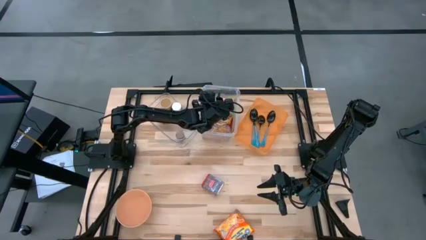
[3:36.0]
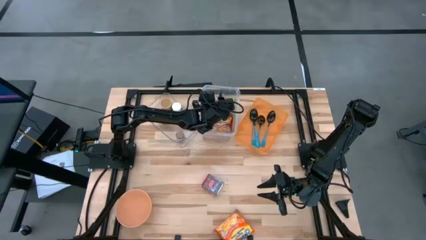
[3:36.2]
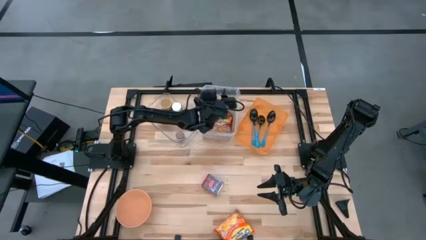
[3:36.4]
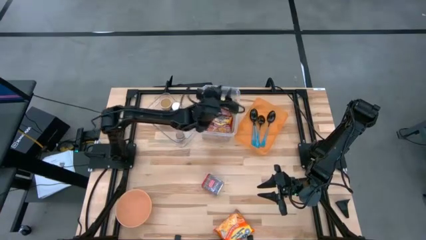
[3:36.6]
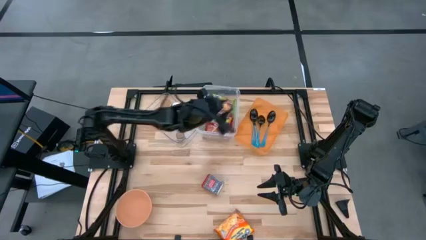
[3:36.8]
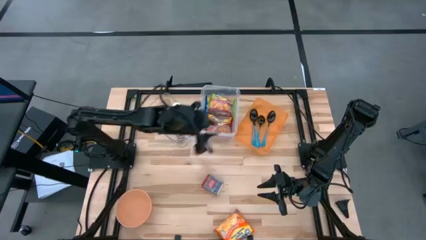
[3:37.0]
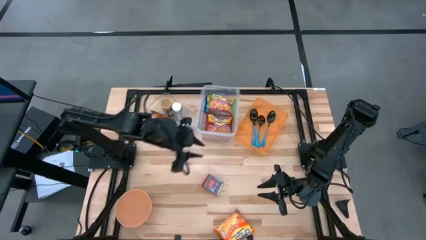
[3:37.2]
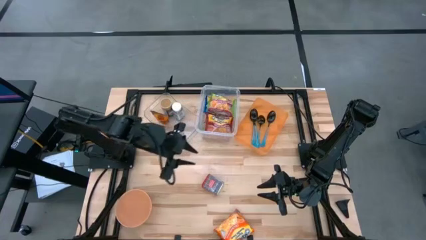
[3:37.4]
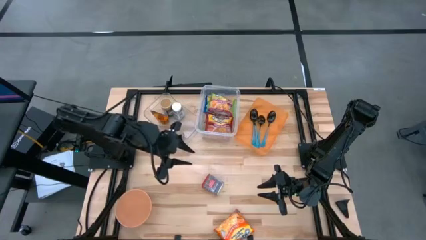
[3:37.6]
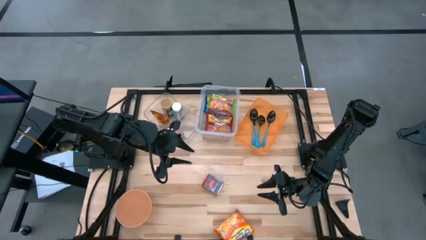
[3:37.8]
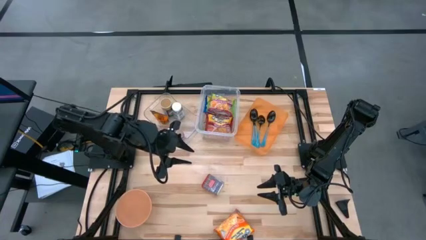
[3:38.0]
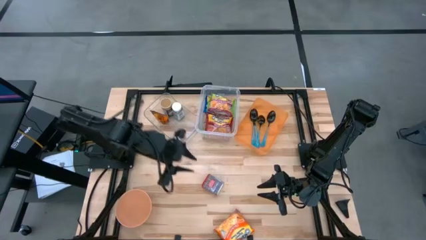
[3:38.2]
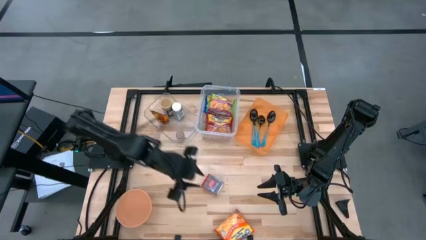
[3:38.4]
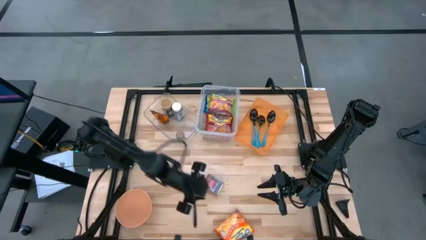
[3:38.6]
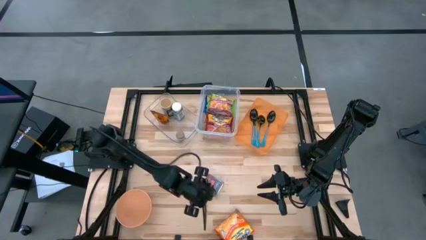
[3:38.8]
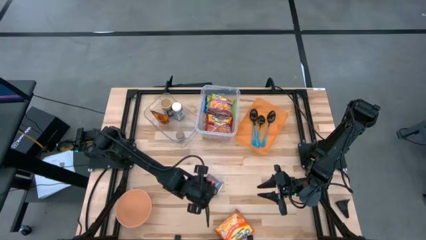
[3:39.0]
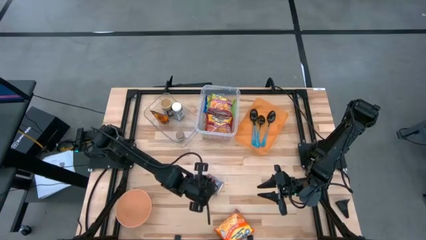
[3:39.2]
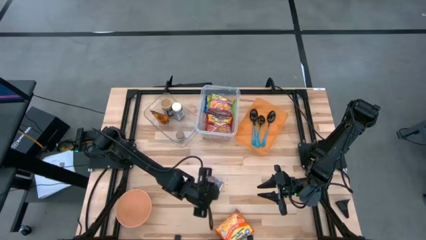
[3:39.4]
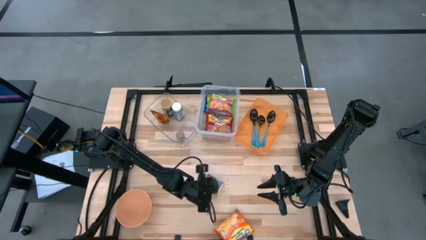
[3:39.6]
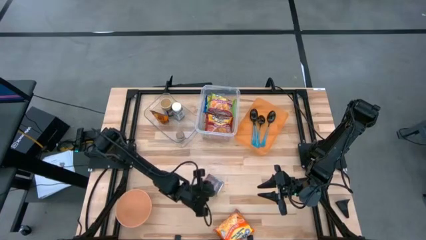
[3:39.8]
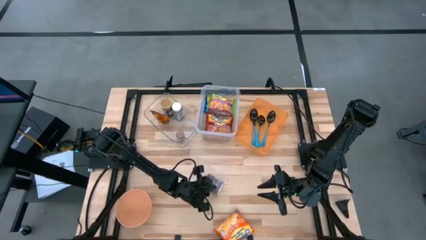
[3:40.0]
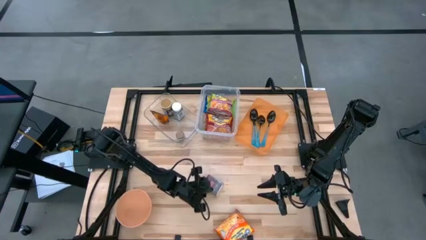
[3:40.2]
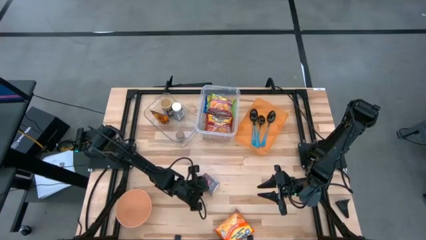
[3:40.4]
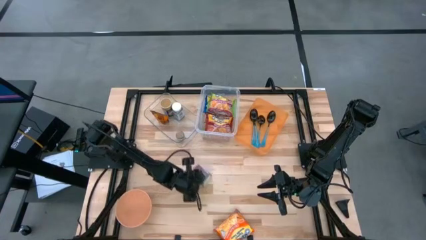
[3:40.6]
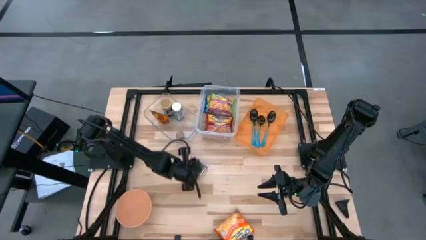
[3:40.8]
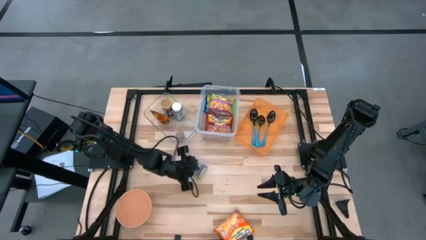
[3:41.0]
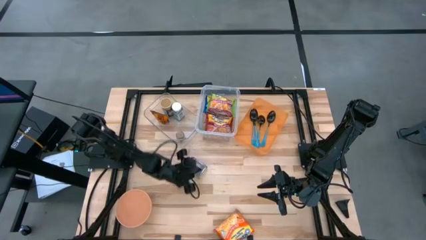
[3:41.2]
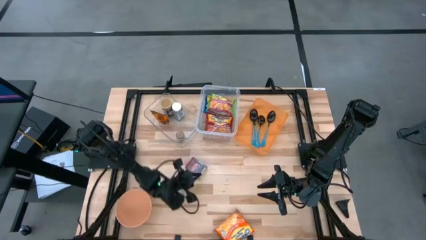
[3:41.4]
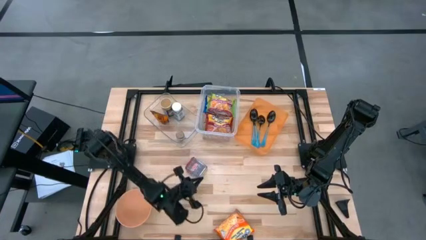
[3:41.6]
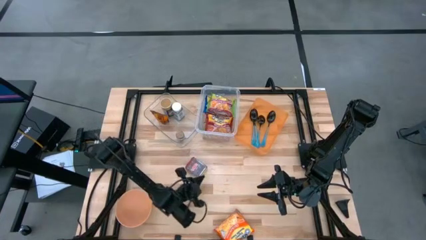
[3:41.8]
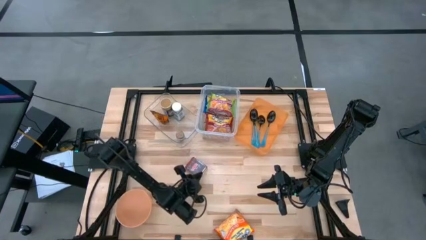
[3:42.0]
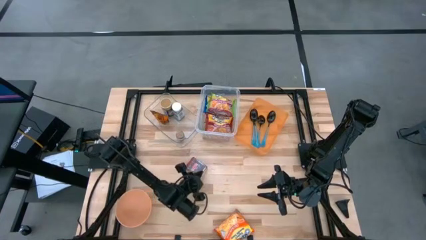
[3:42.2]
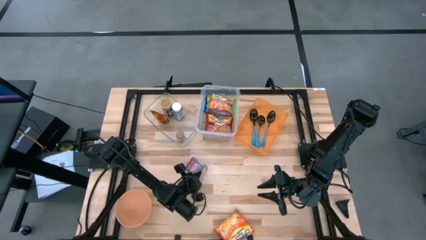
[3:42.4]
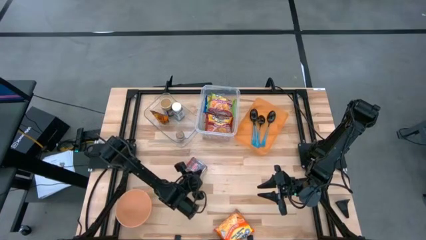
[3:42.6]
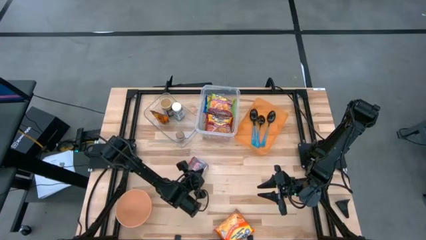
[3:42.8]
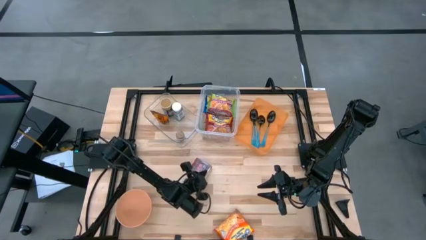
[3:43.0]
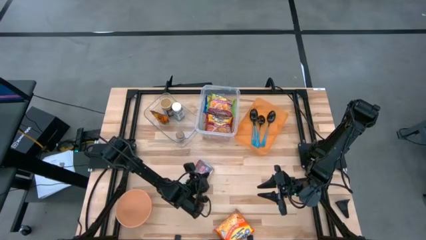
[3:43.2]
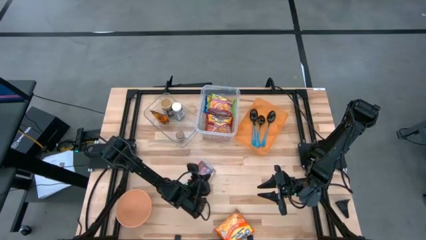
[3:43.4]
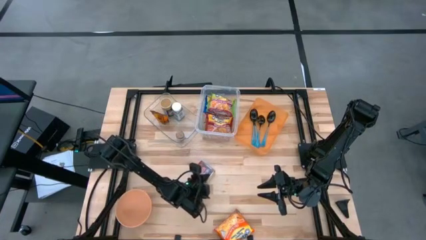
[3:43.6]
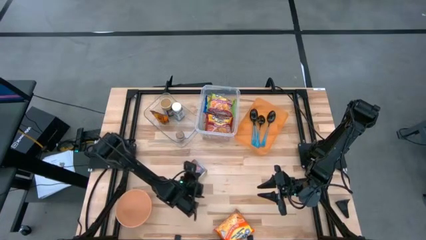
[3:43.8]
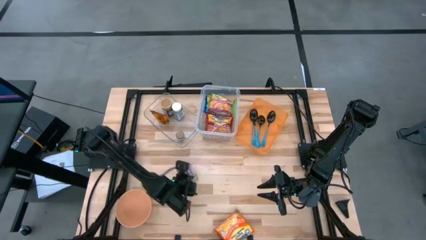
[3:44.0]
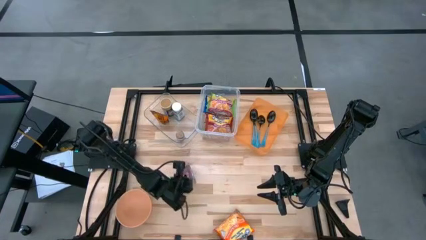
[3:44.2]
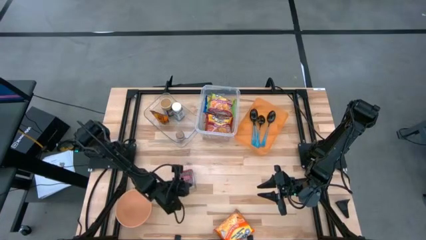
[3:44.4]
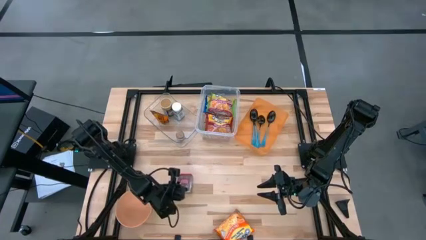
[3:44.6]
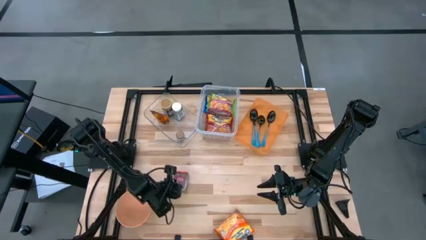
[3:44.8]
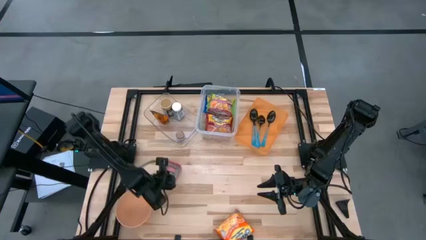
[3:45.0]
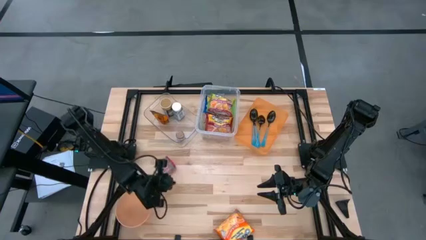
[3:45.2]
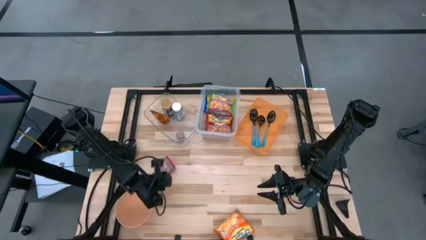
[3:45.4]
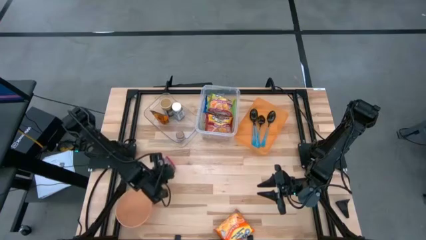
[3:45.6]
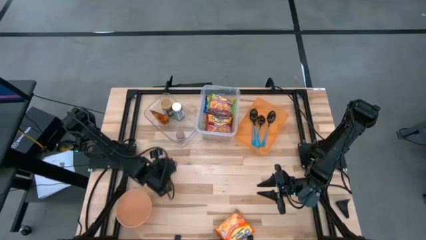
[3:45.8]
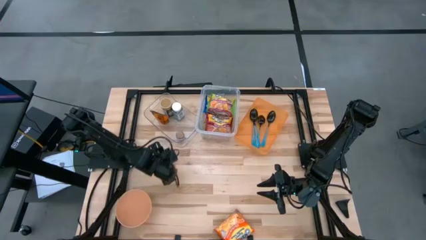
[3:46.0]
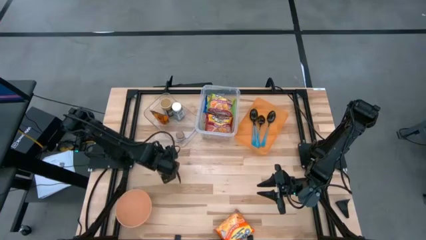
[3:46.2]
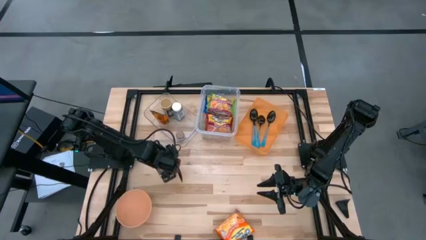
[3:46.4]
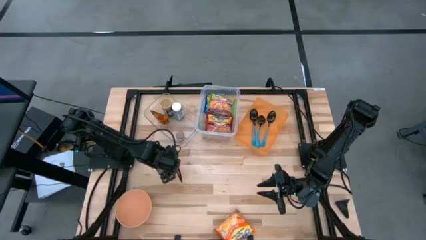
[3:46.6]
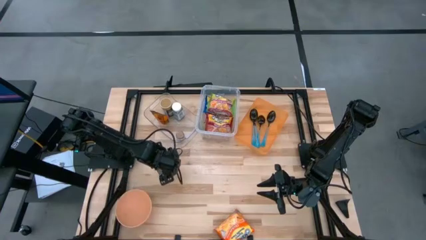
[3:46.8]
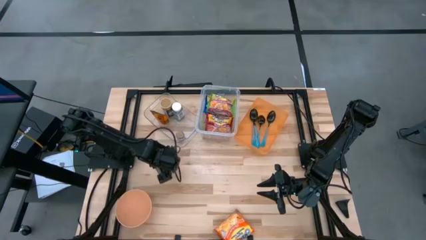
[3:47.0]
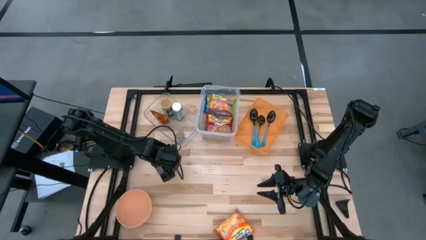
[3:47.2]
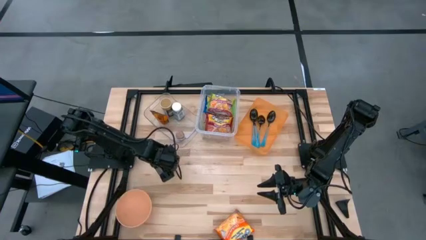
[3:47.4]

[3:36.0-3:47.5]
Task: Pick & Place Food Item
Put the red seasoning can into the transparent bin
